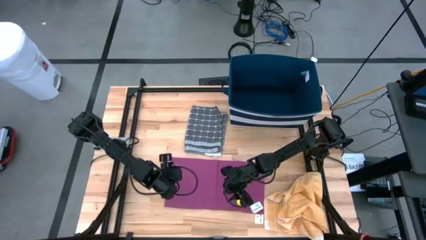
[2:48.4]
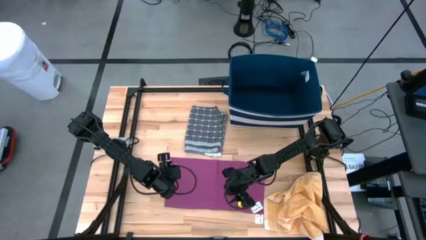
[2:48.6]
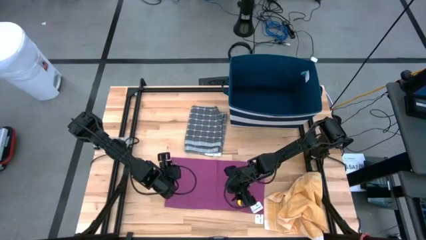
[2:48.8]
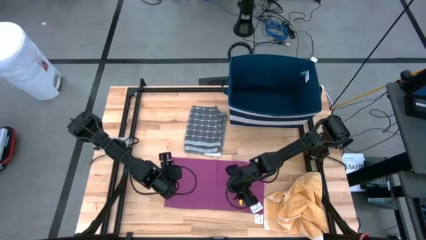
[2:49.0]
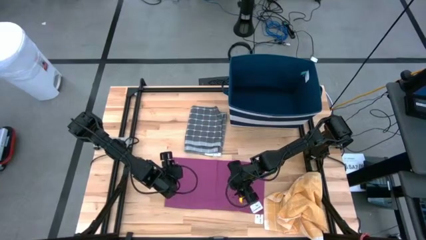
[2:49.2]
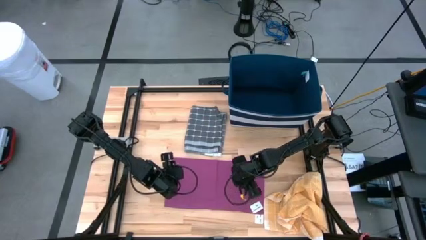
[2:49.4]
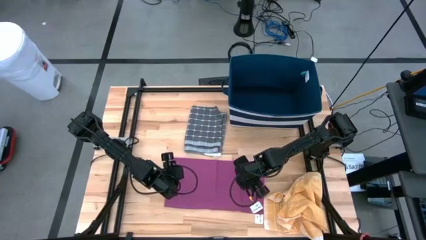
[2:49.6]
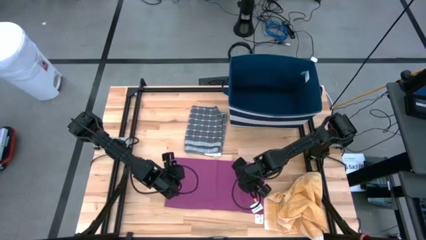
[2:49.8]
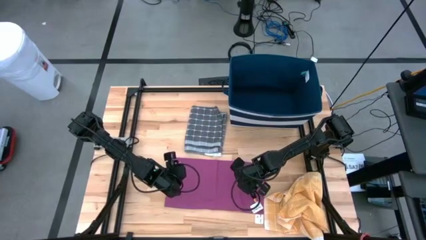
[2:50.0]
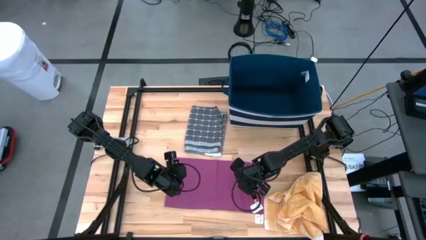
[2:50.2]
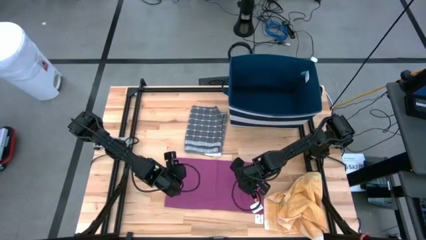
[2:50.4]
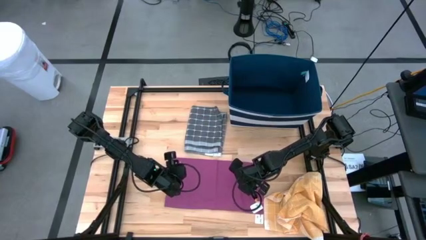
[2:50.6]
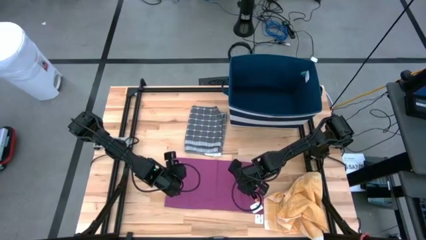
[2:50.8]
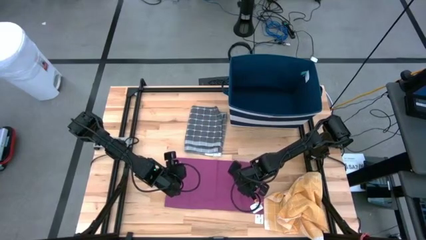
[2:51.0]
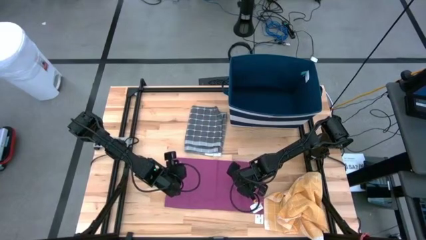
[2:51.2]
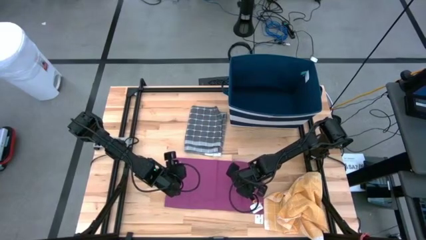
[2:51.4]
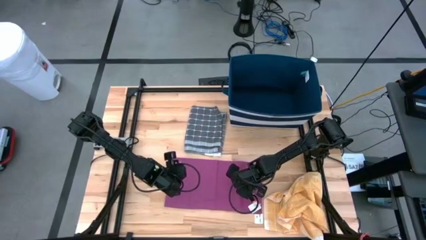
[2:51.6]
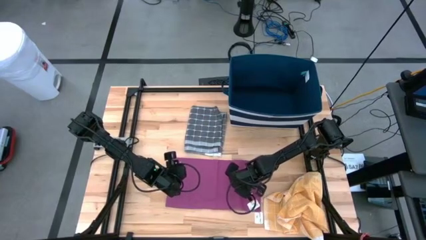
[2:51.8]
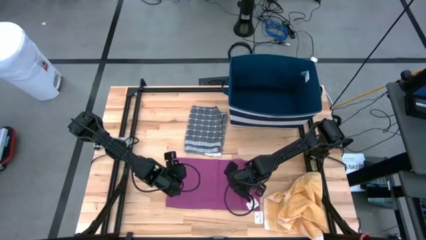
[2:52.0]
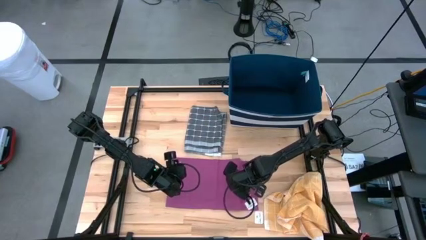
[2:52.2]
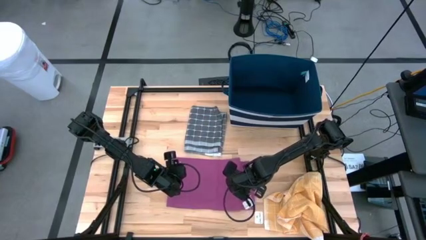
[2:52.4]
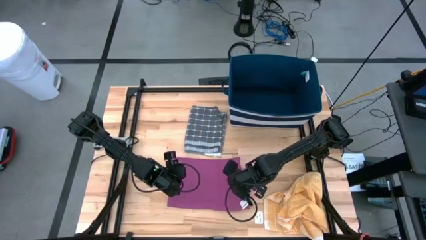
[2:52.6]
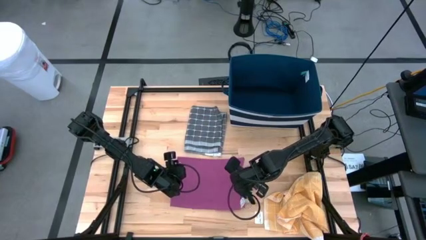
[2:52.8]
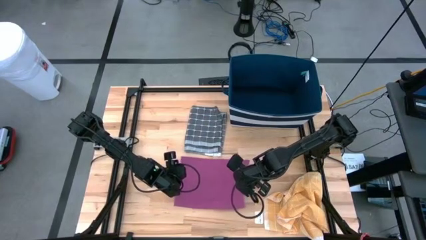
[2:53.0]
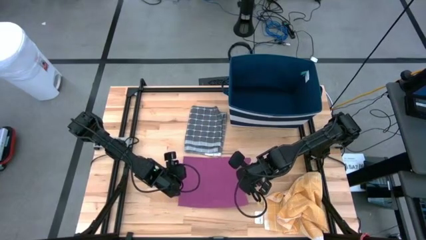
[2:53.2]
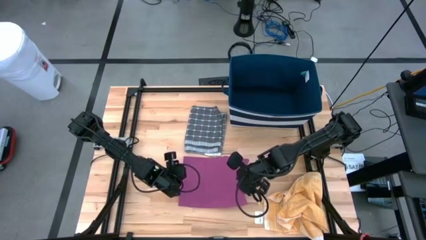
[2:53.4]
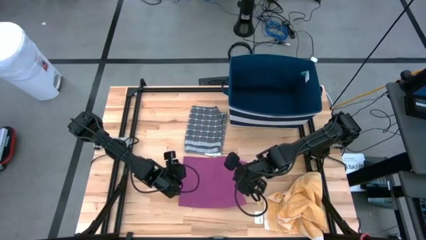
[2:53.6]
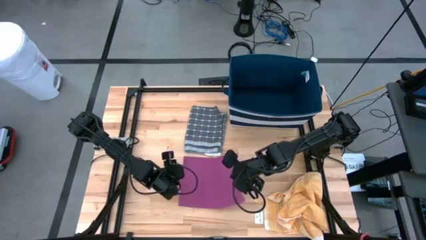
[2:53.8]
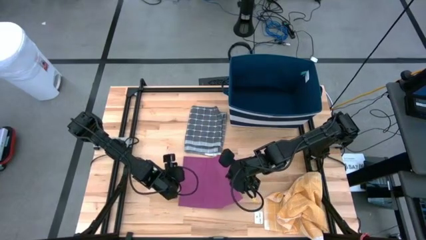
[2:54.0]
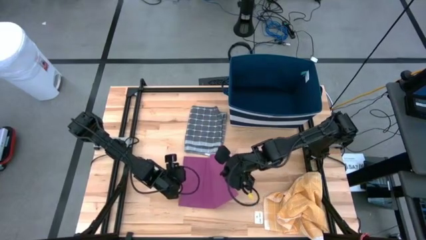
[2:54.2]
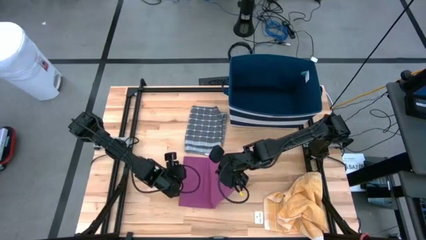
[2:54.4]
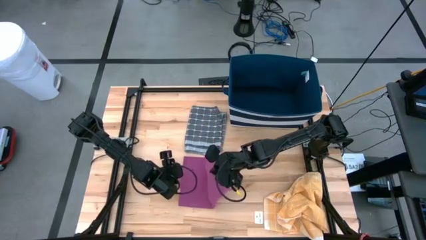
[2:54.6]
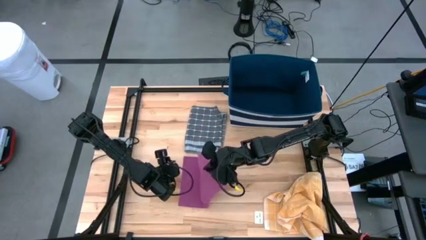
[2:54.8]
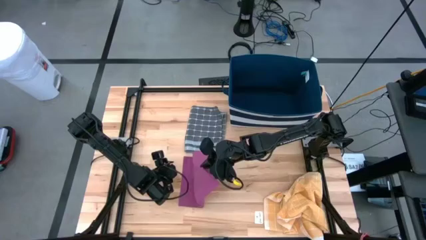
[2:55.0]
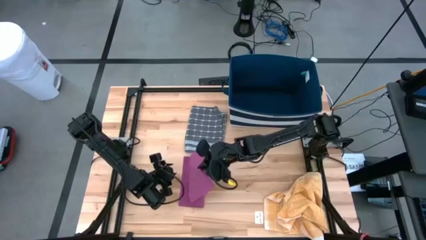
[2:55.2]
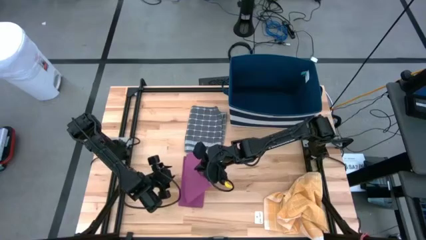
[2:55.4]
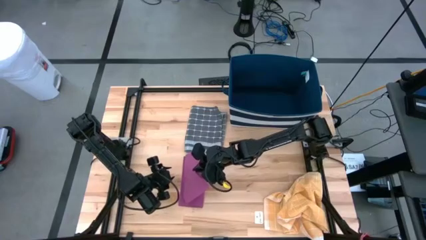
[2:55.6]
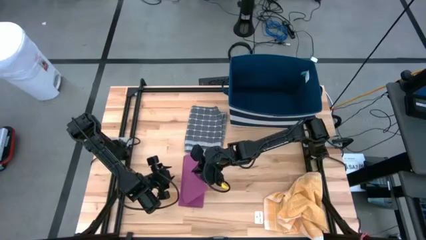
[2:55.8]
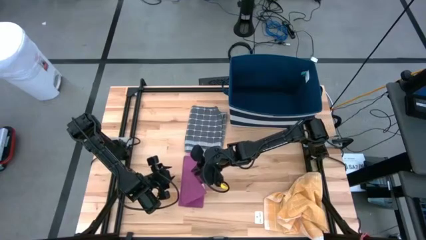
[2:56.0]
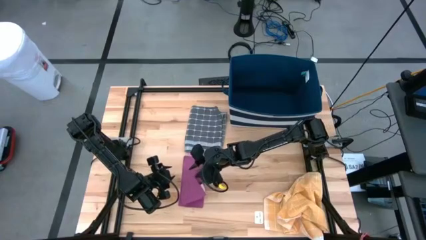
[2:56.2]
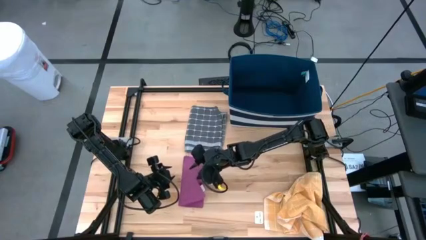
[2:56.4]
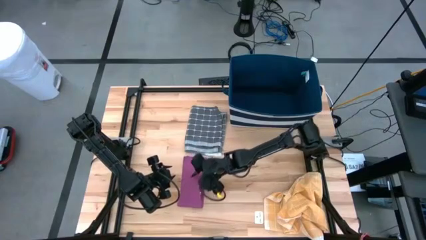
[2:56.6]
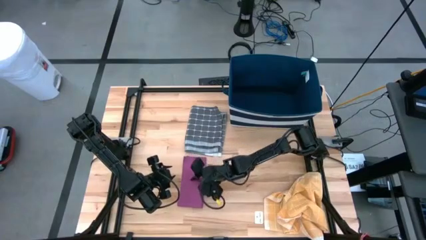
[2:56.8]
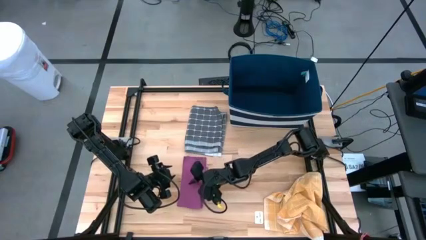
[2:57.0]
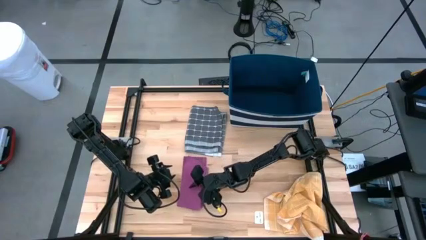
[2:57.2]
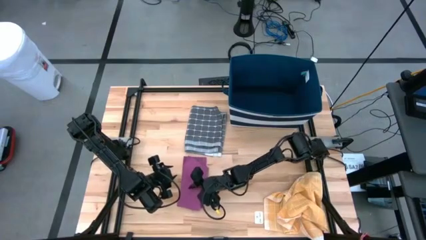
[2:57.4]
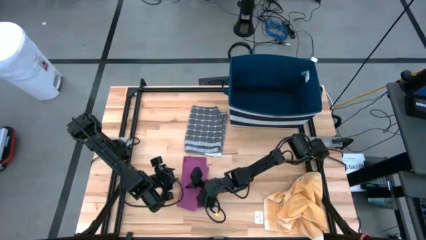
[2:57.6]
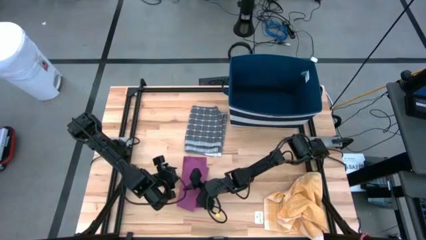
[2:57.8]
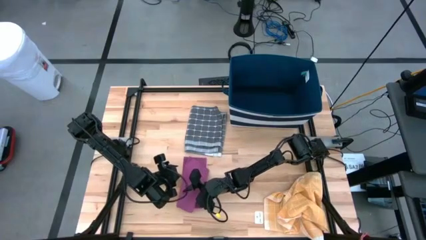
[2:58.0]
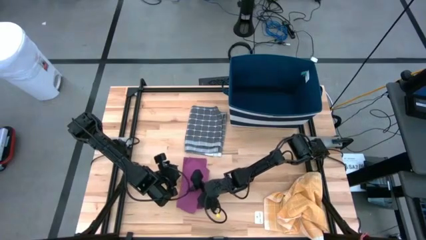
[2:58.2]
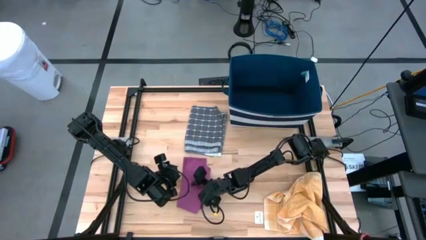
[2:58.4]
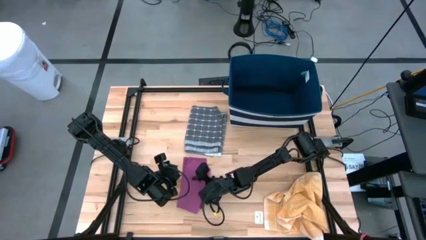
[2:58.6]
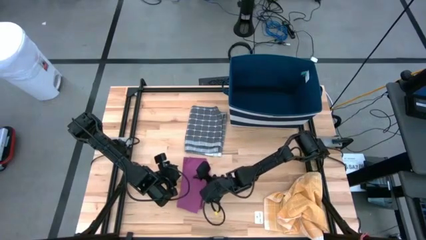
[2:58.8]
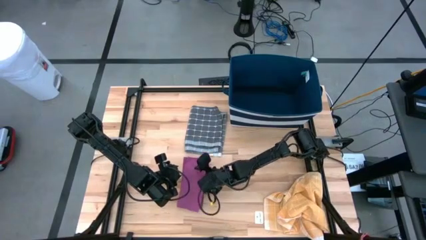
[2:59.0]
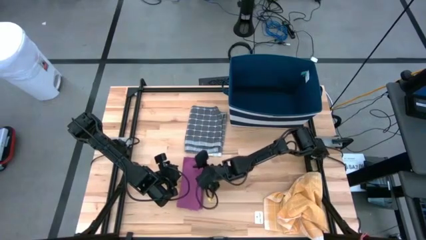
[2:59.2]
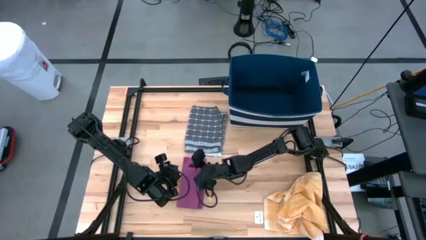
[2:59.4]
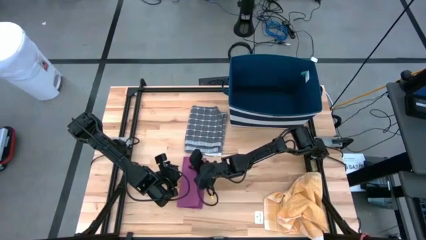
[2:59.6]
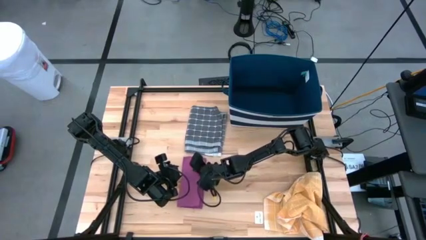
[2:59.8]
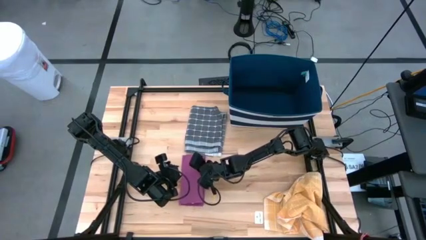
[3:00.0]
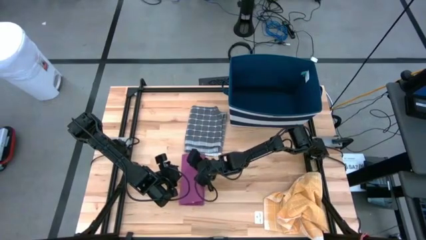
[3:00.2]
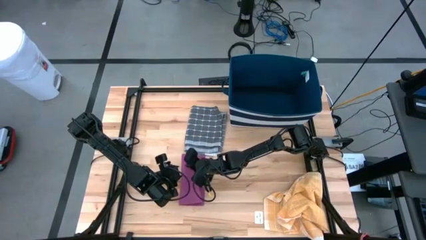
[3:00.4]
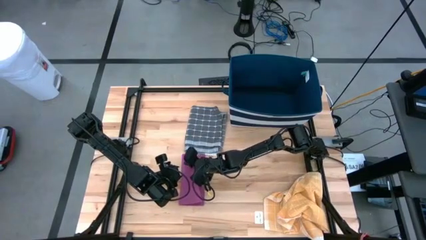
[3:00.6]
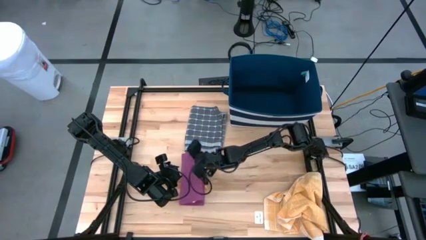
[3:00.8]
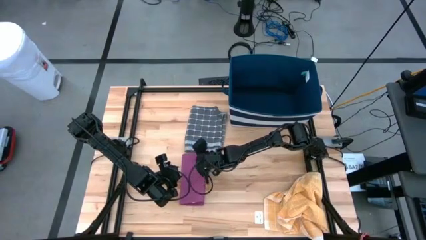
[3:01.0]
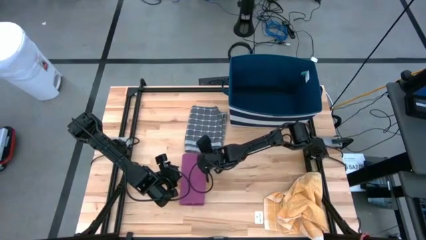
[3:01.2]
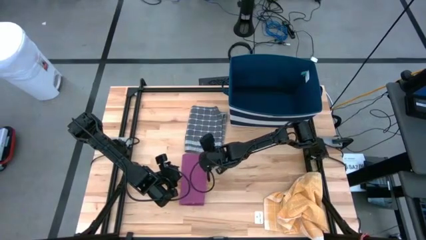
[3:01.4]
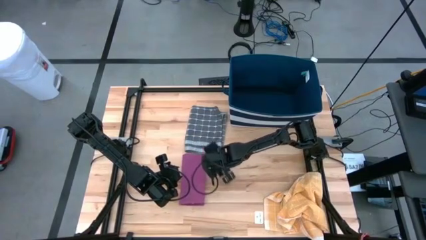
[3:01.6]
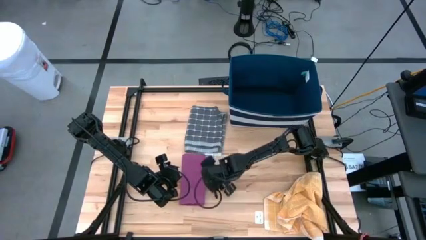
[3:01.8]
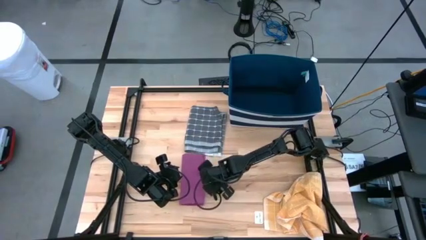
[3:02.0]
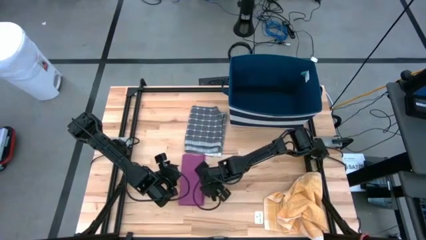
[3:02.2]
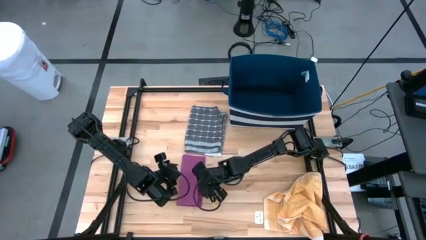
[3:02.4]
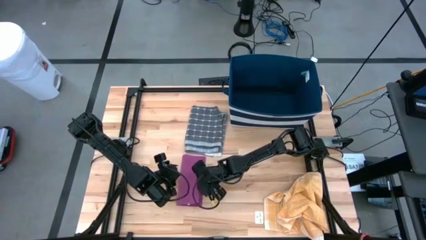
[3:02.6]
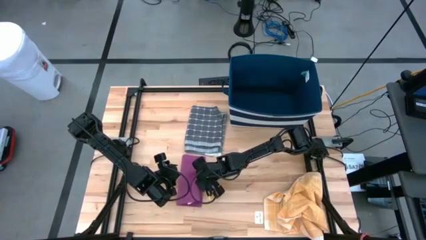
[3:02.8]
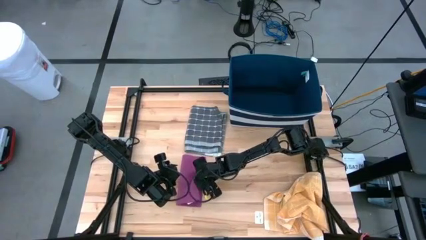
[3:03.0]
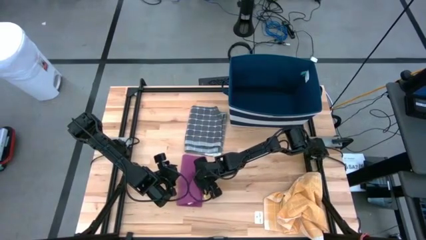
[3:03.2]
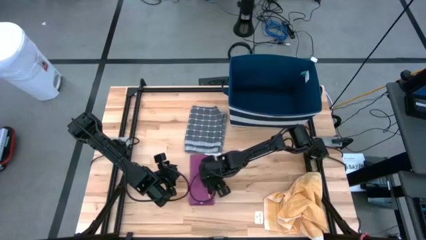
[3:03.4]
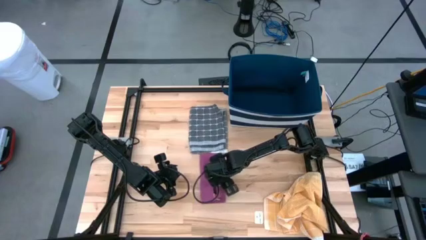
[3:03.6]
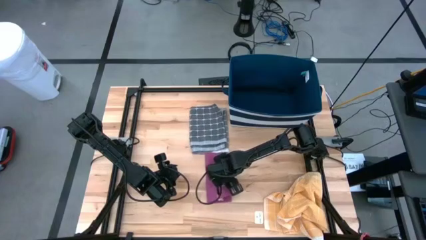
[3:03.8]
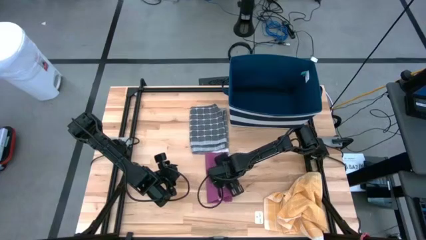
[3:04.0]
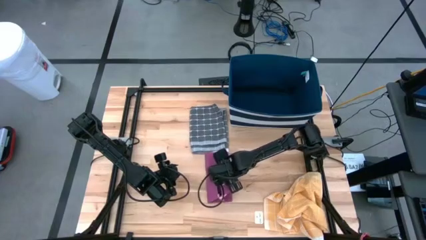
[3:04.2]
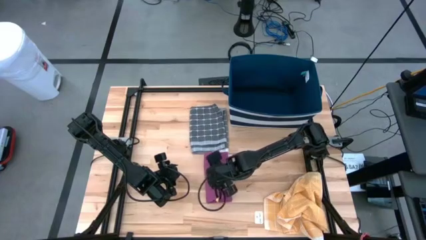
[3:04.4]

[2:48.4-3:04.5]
Task: Fold towel
Fold the pink towel
